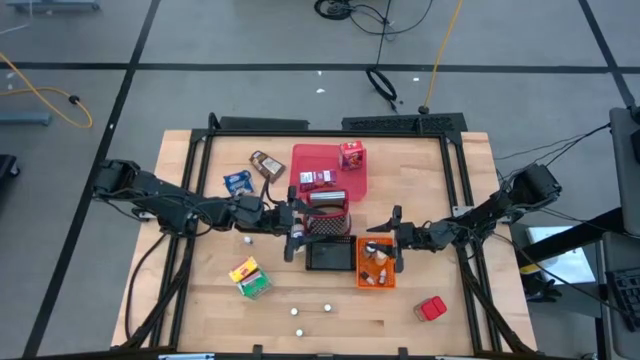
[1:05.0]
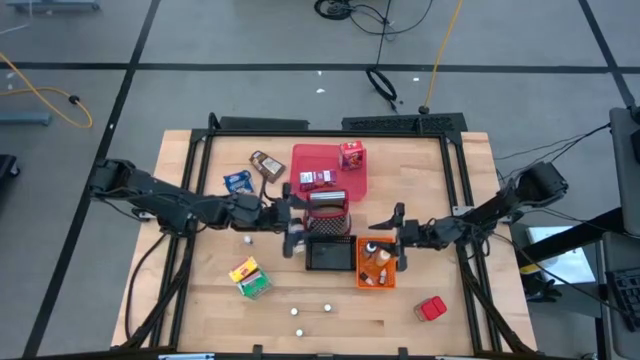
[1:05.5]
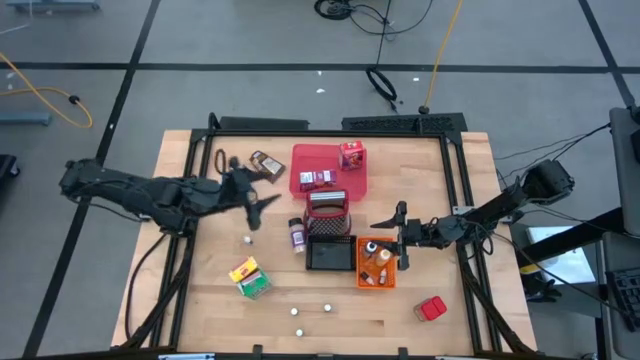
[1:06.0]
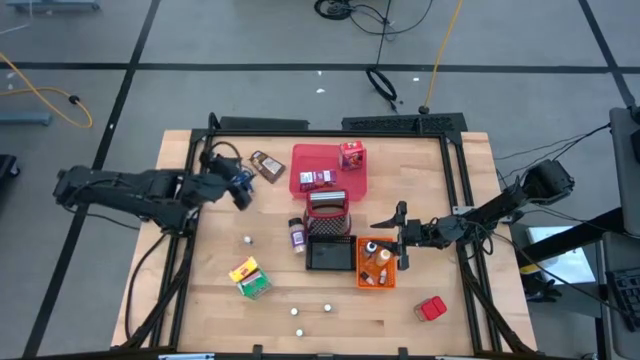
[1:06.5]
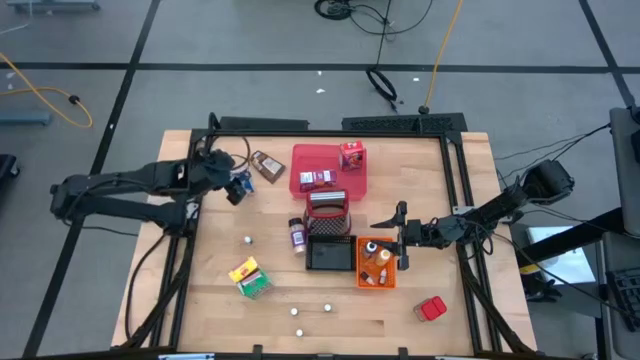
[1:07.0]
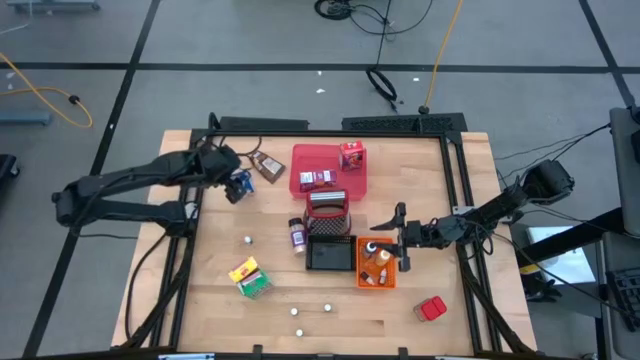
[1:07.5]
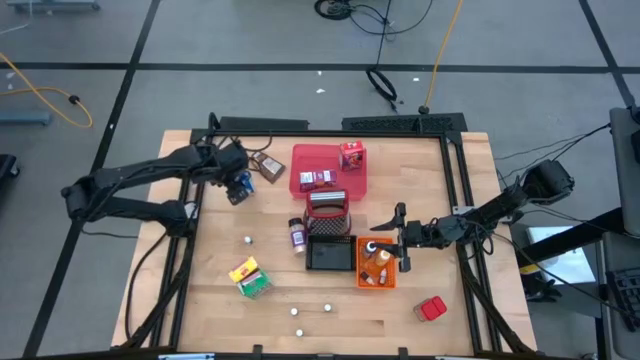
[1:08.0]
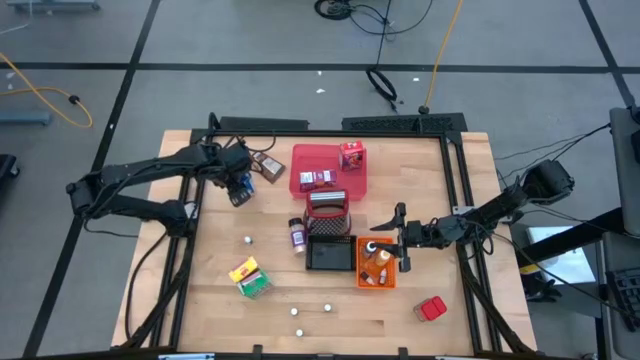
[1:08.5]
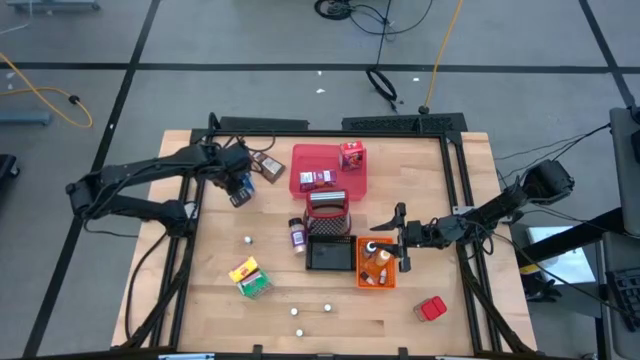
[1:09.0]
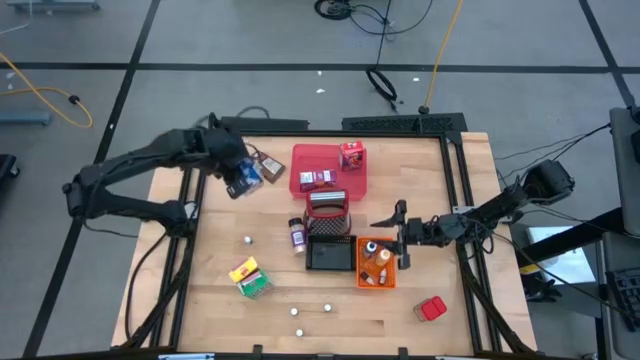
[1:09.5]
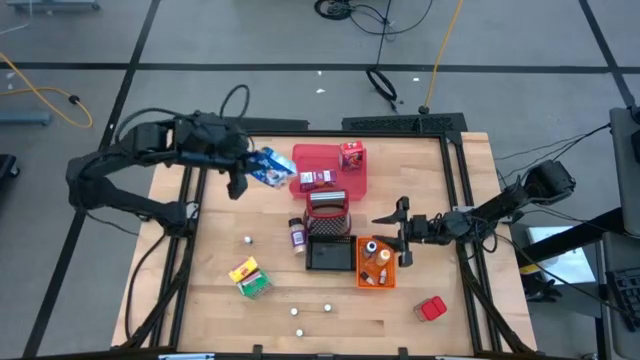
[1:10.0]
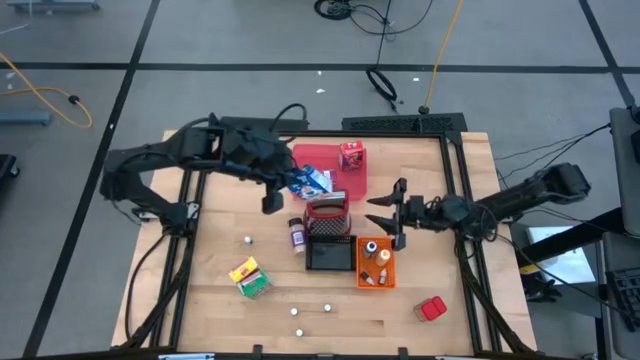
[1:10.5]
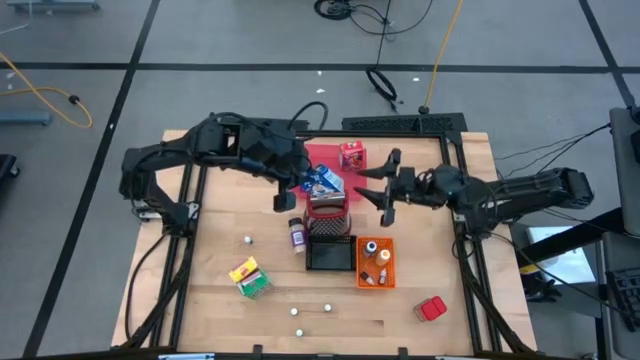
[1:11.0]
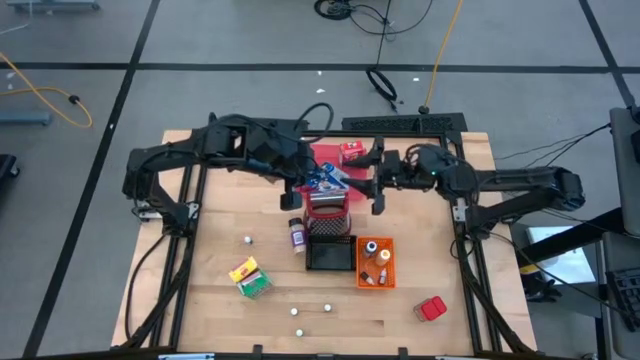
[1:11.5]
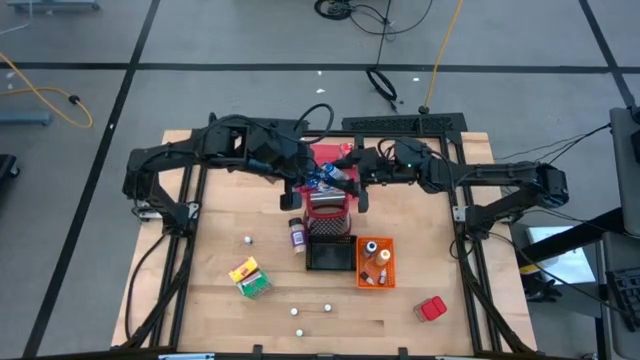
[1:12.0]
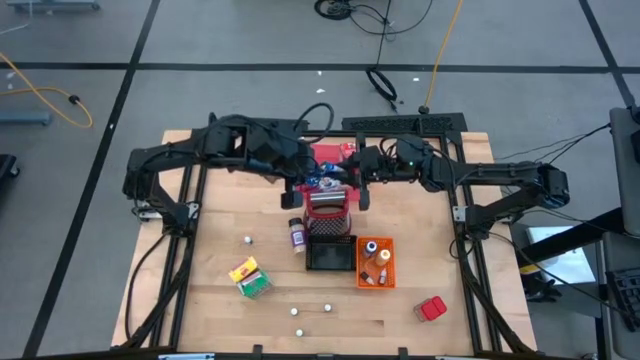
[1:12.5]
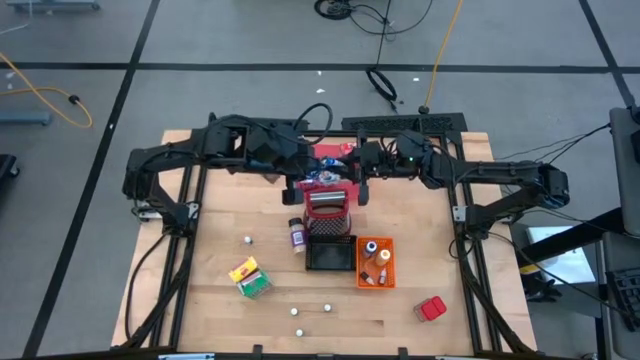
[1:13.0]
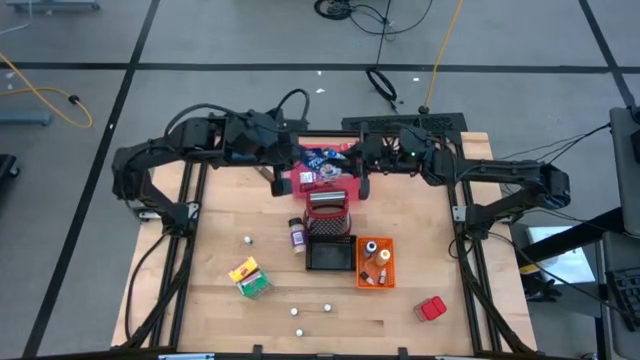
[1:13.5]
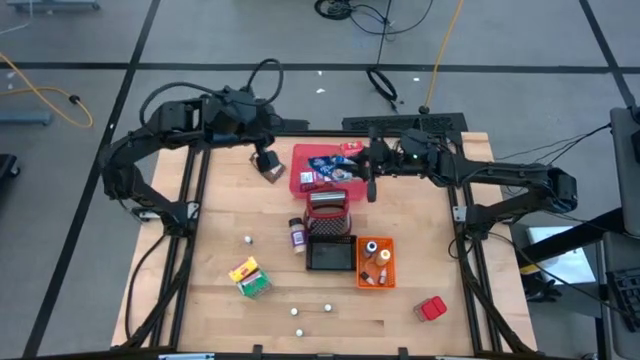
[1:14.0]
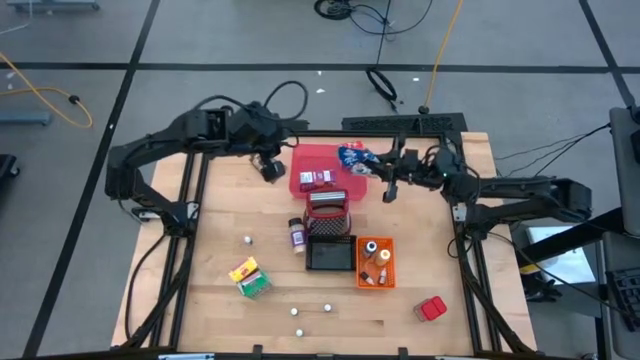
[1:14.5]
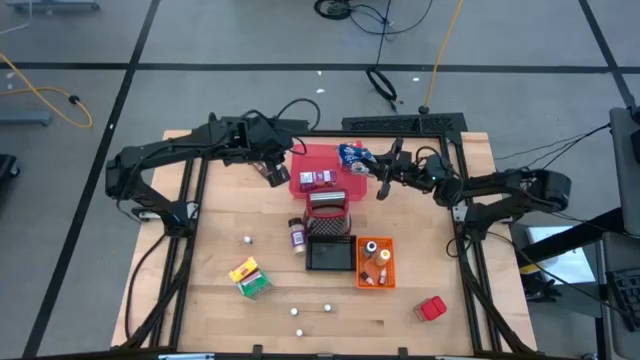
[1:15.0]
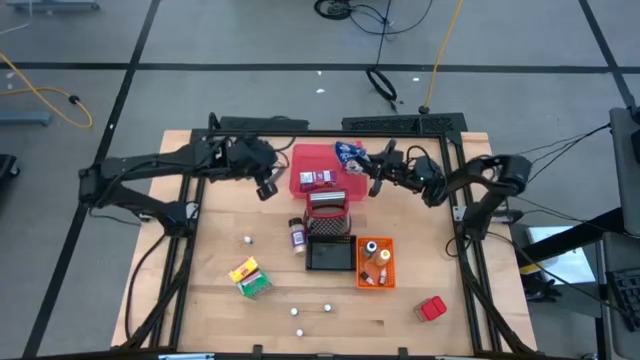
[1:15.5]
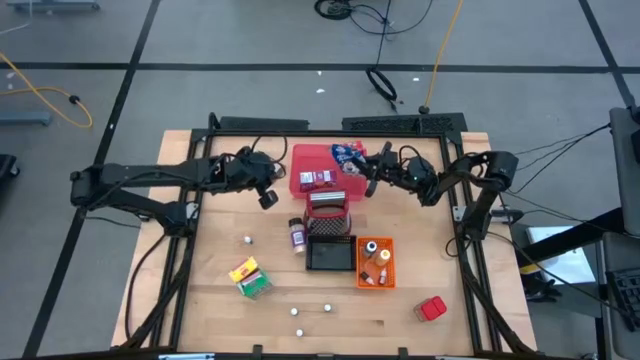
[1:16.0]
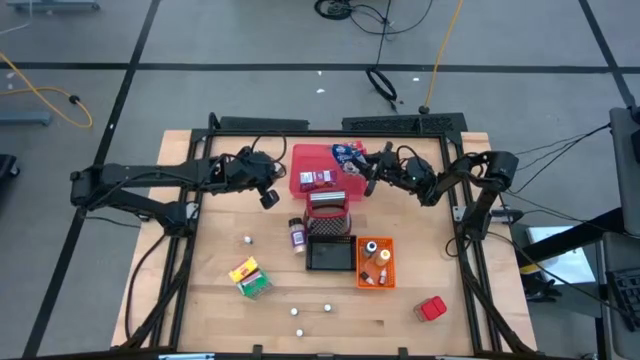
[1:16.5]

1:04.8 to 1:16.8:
Task: Pick & Place Kitchen Items
Put the blue cereal box into the red bin

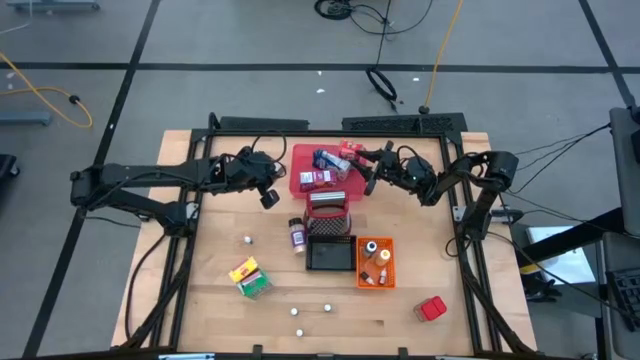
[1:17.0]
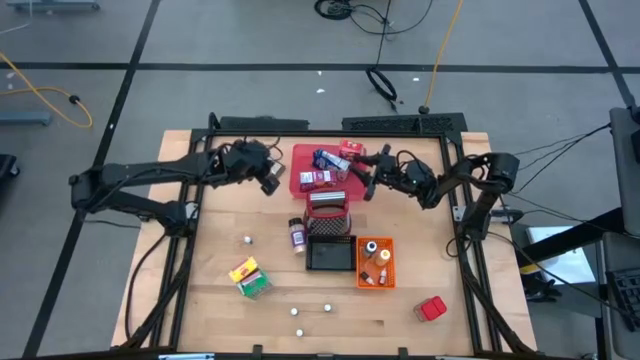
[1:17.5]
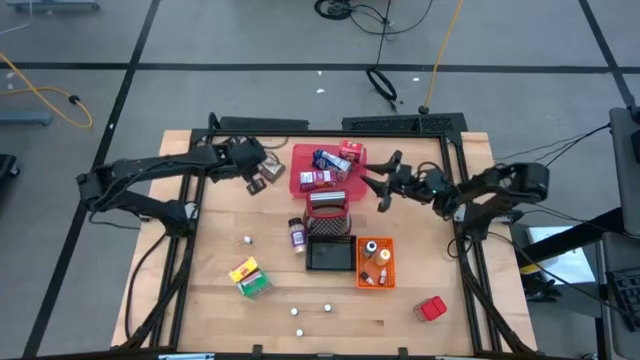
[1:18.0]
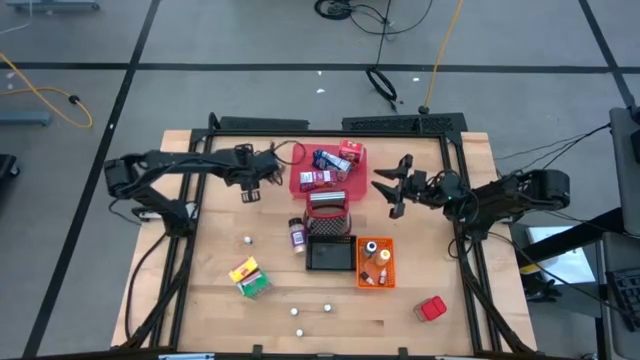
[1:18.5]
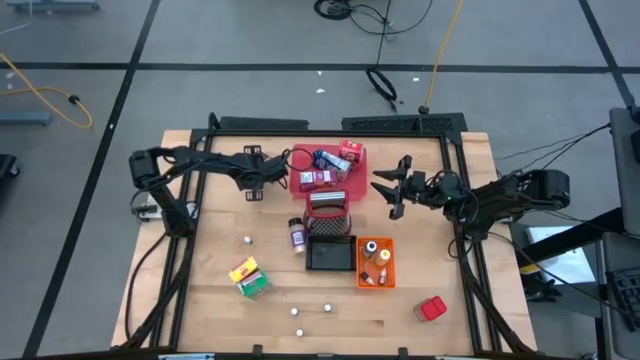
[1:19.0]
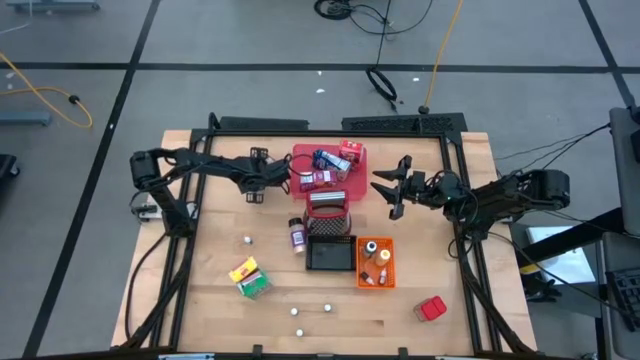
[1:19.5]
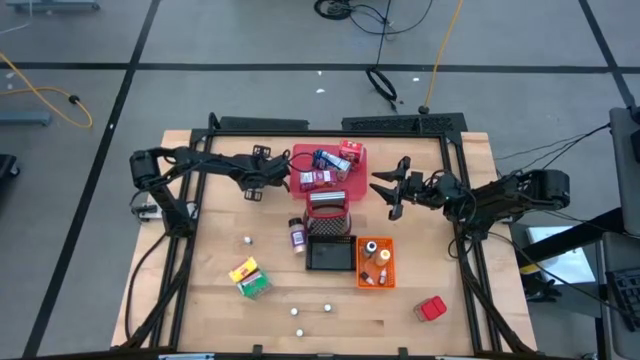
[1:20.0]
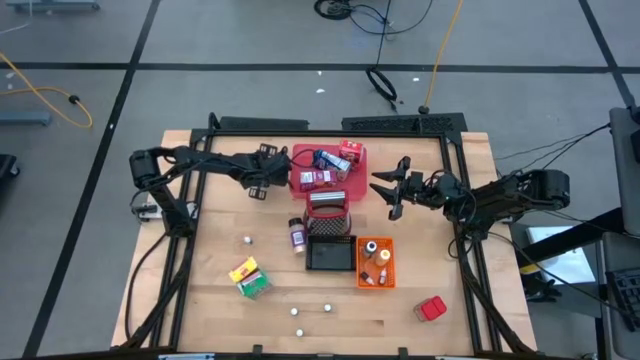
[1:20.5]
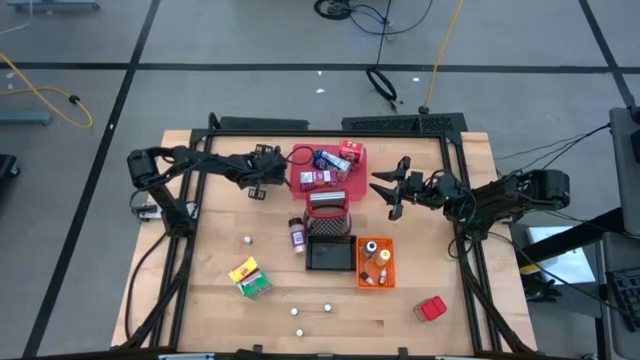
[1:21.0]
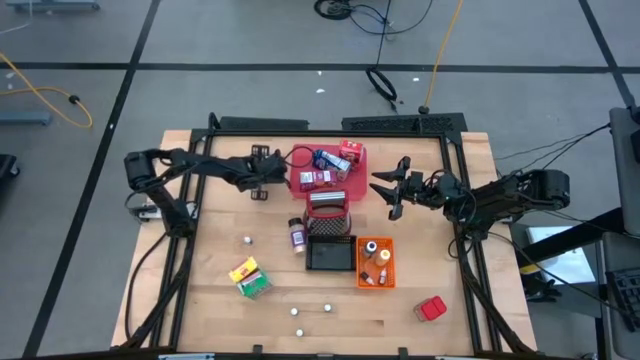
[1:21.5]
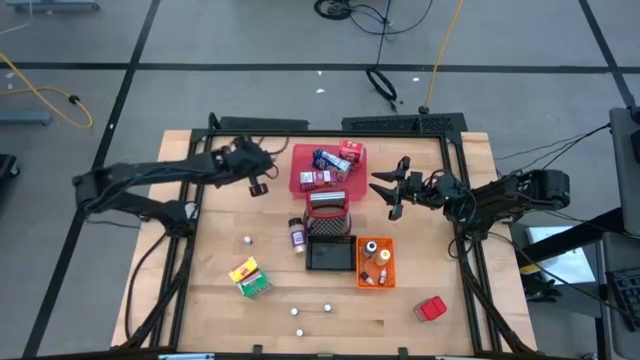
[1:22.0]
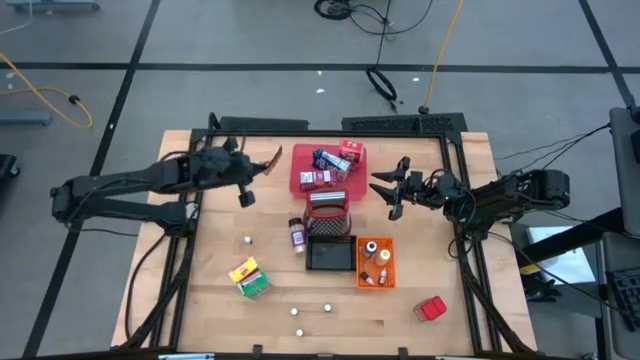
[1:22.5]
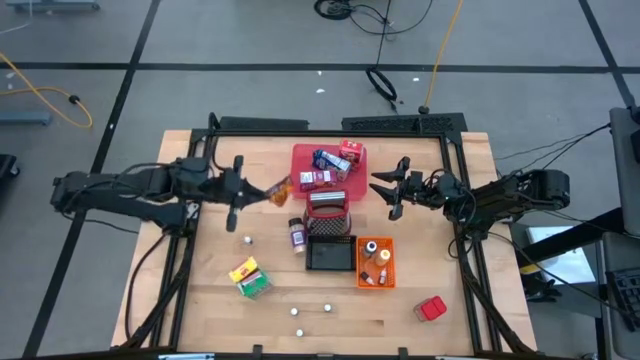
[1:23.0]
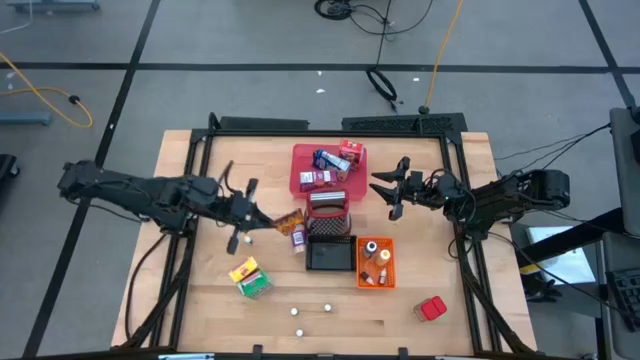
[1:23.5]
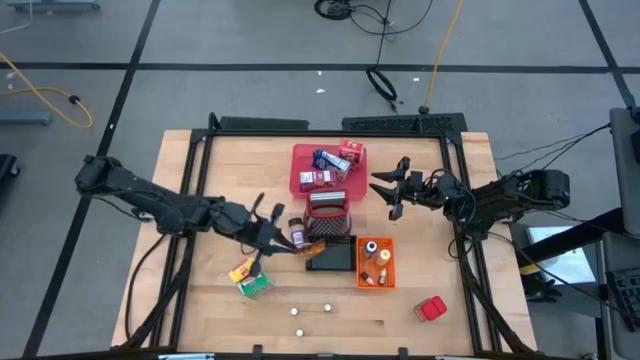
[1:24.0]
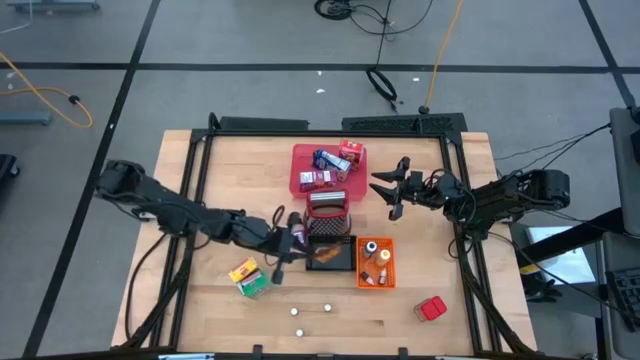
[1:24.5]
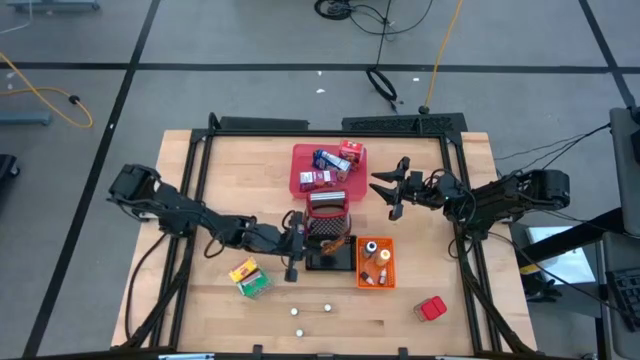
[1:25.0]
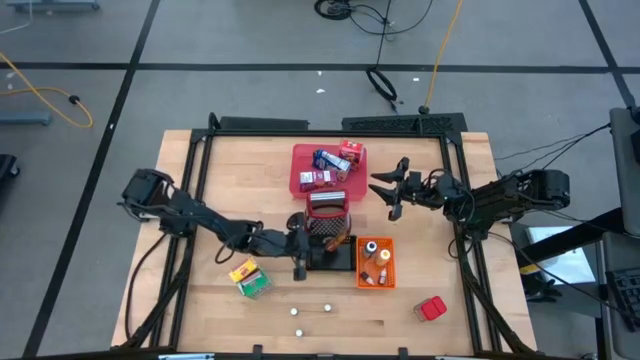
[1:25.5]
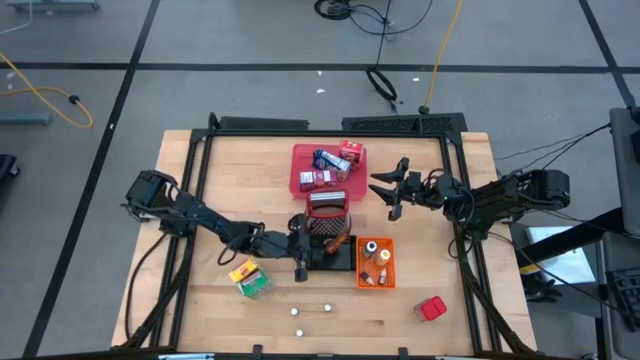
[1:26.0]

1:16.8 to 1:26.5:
Put the orange seasoning bag into the black bin

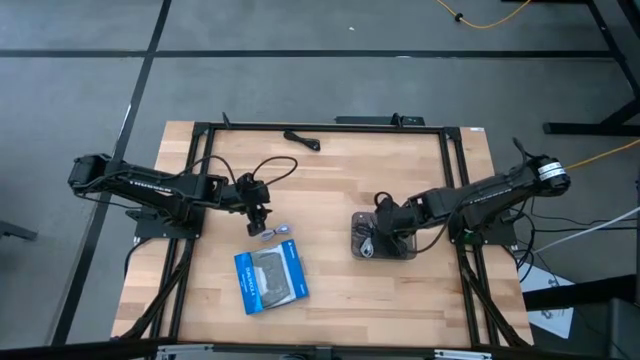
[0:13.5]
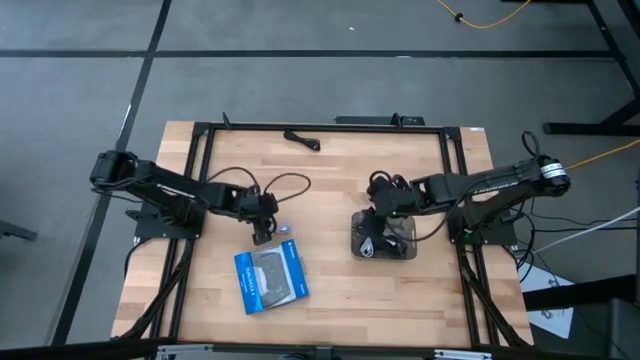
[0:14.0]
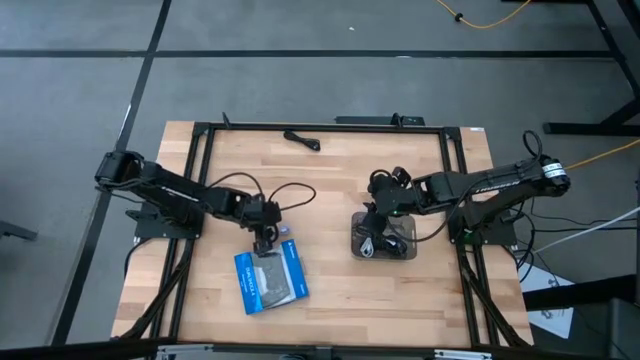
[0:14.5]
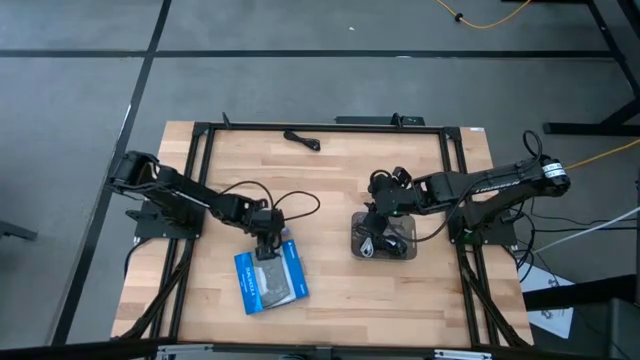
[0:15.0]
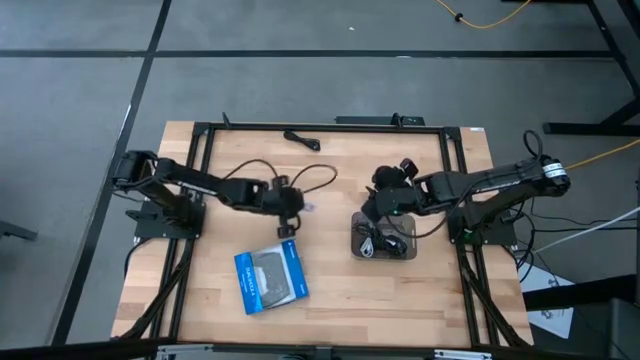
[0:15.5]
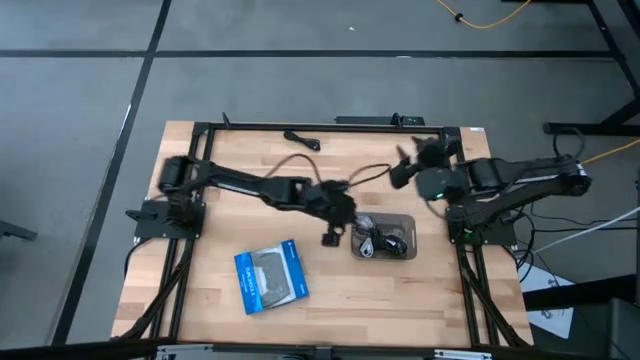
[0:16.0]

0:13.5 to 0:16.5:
Task: Pick and place USB-C Cables
Put the white charger cable into the black bin
